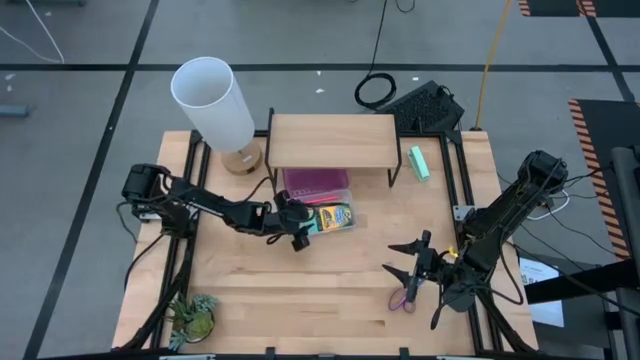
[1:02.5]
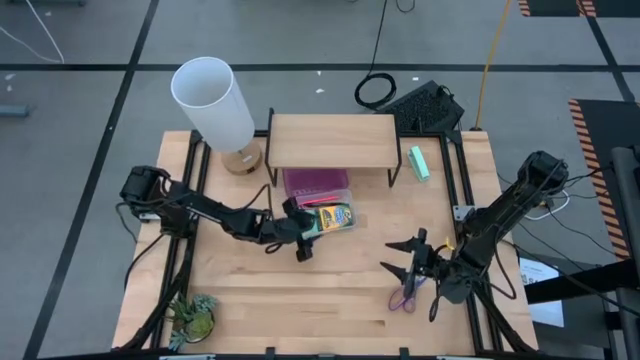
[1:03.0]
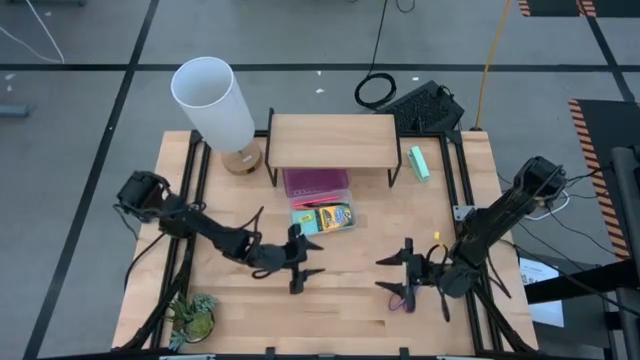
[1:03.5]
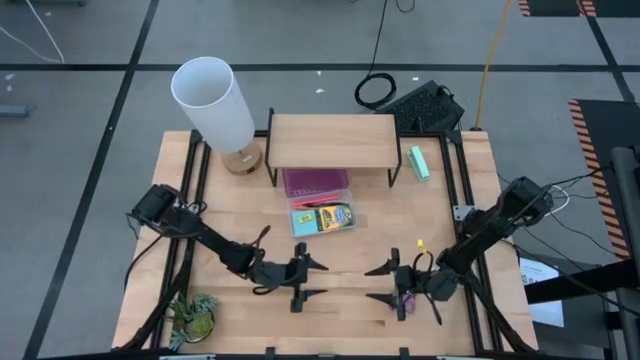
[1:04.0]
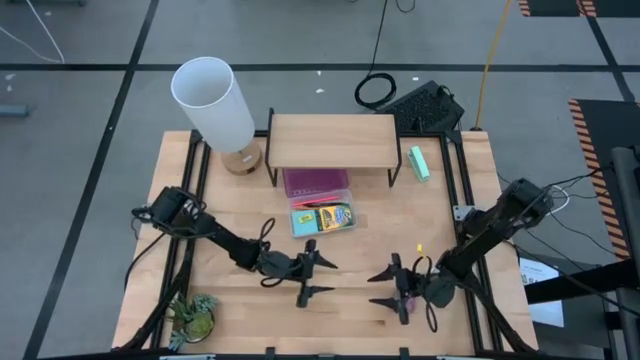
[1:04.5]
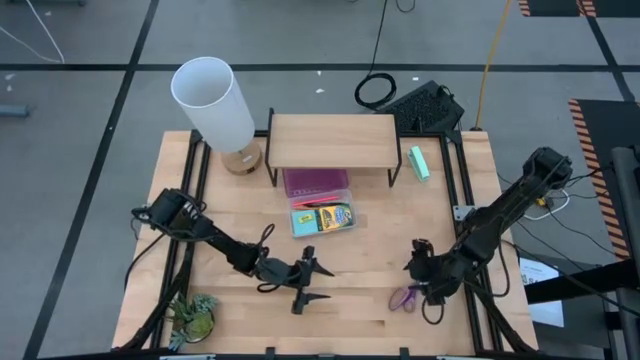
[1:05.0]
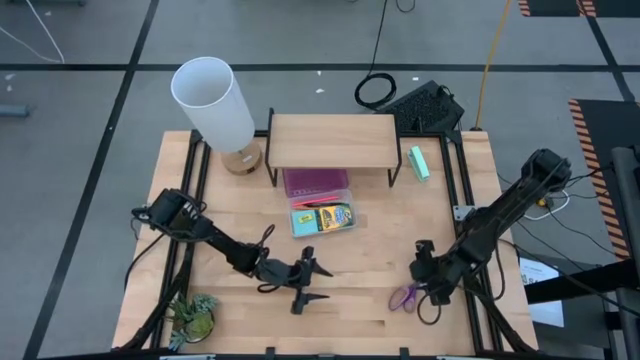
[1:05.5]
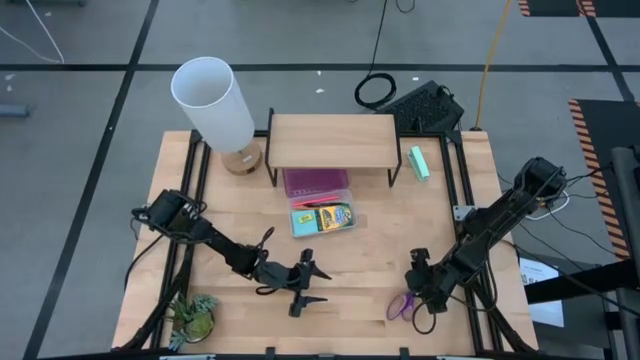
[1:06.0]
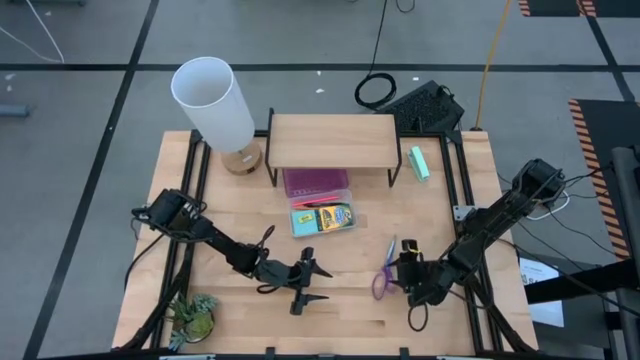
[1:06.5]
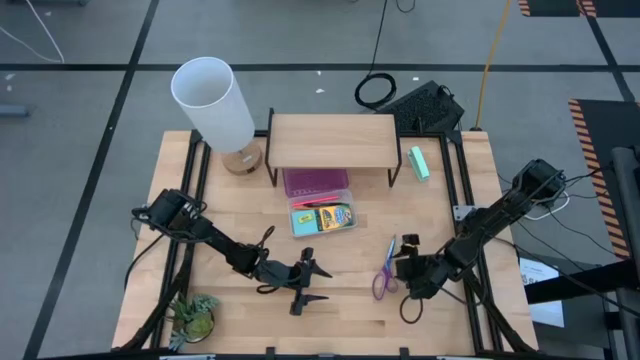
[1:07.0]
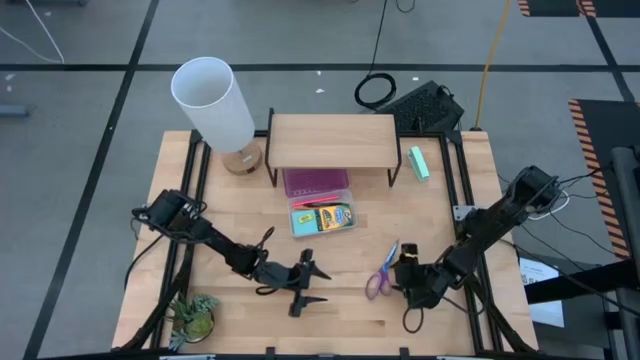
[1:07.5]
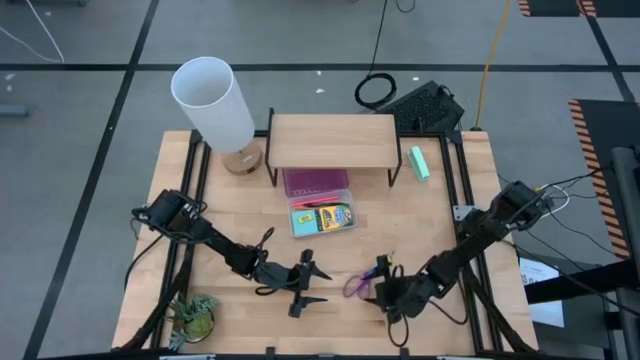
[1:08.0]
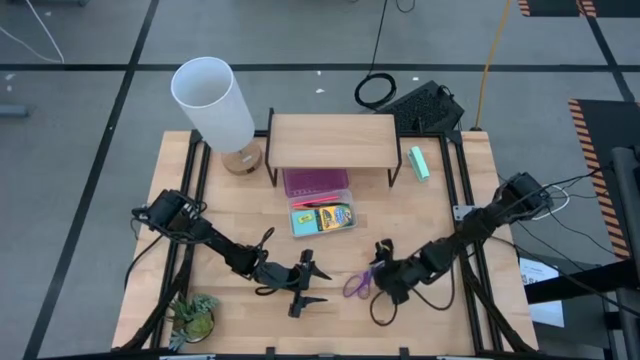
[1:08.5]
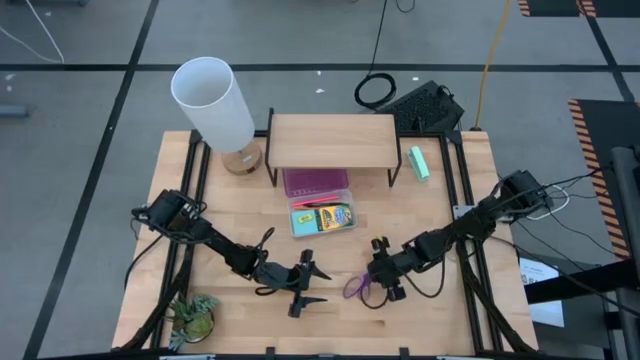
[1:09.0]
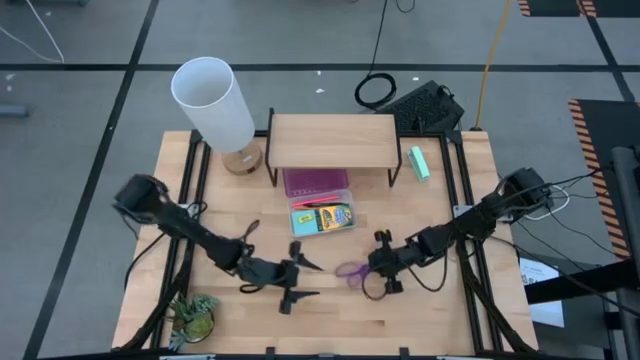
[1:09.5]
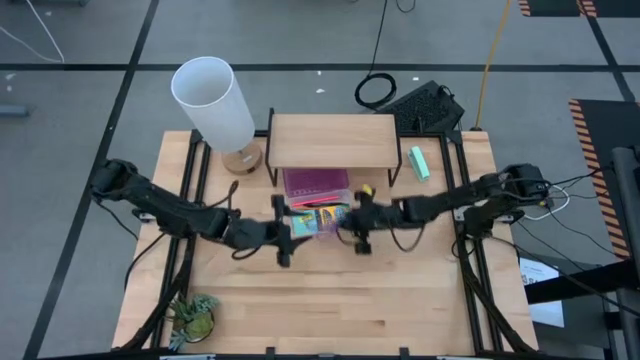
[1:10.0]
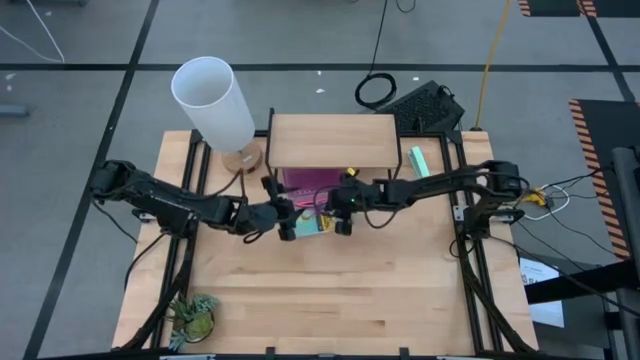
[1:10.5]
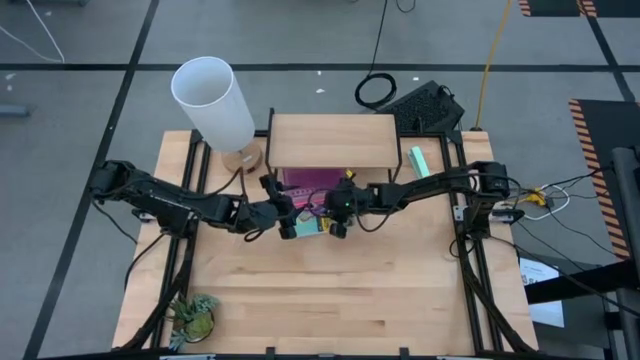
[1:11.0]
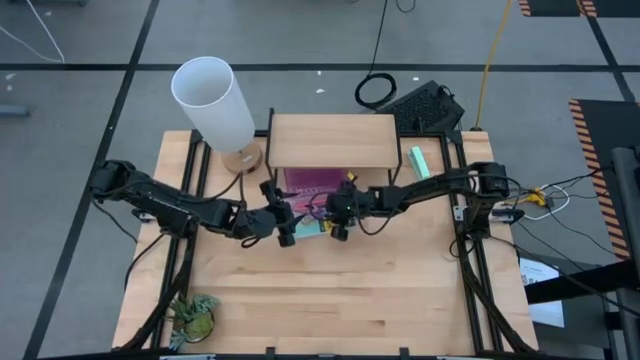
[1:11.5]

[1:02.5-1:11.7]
Task: Pack school essentials
Put the violet scissors into the violet supply box

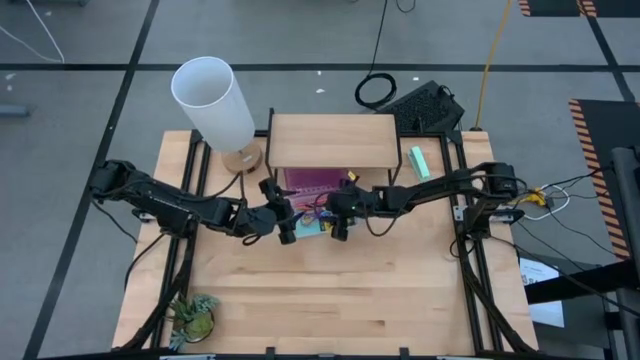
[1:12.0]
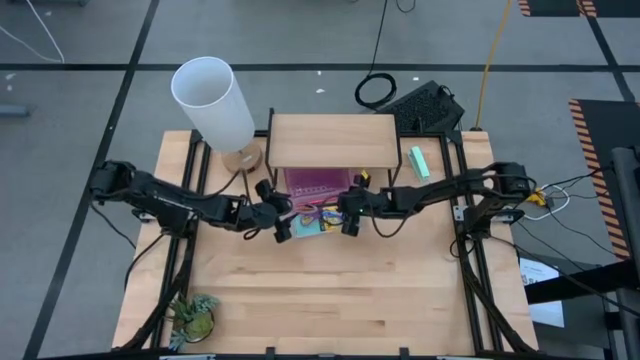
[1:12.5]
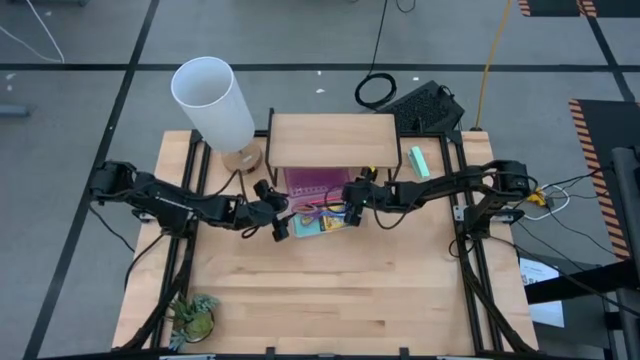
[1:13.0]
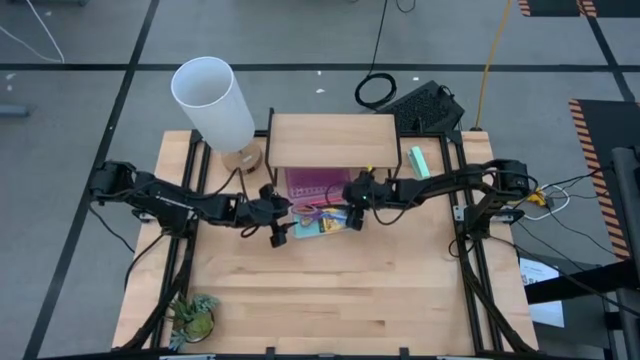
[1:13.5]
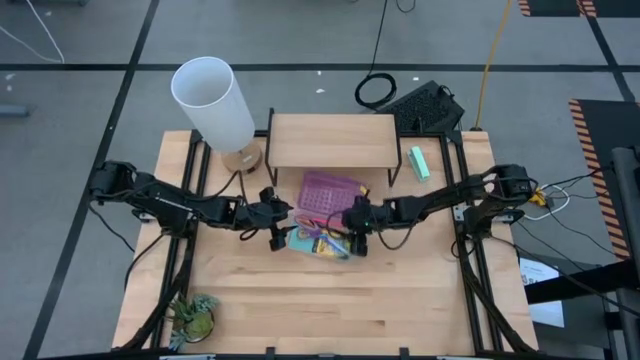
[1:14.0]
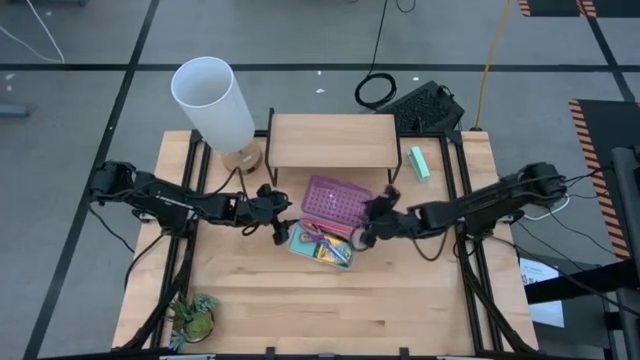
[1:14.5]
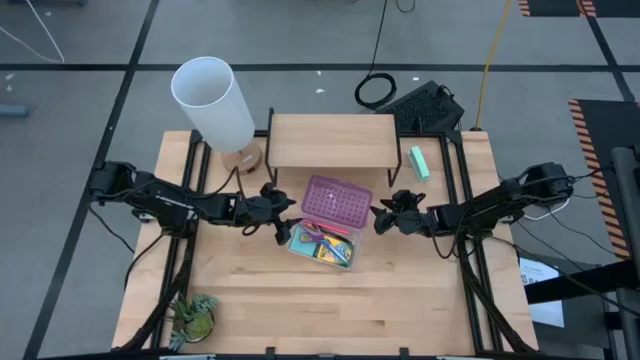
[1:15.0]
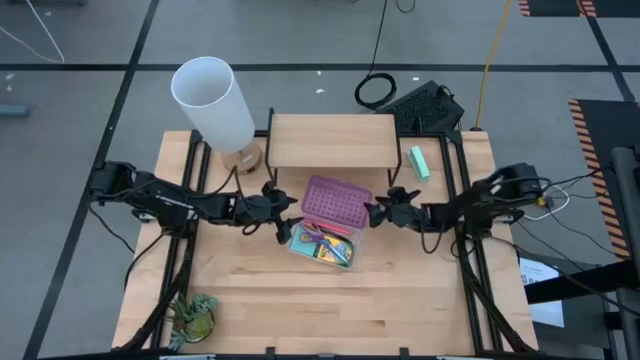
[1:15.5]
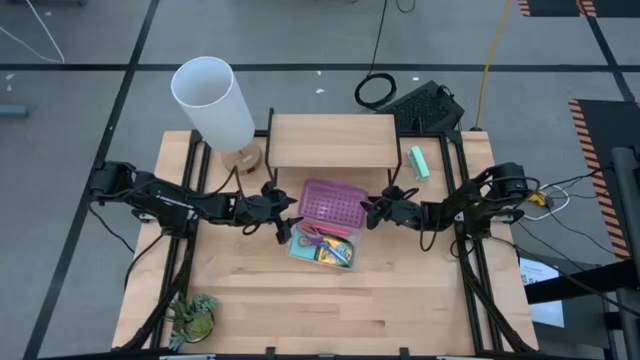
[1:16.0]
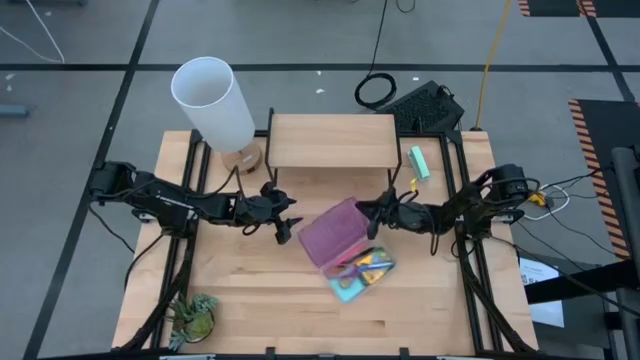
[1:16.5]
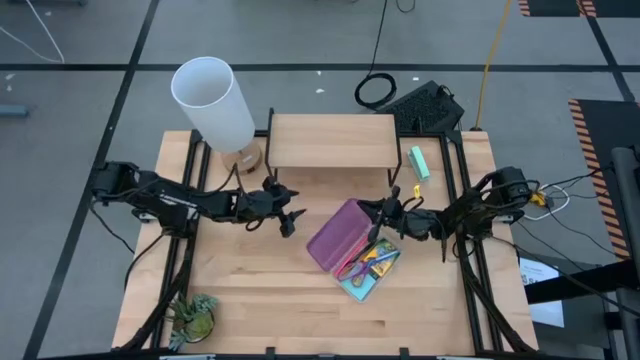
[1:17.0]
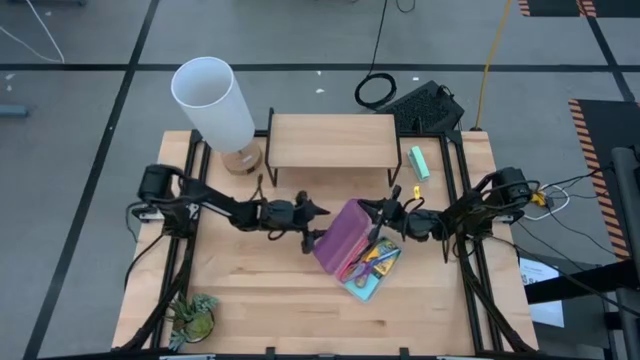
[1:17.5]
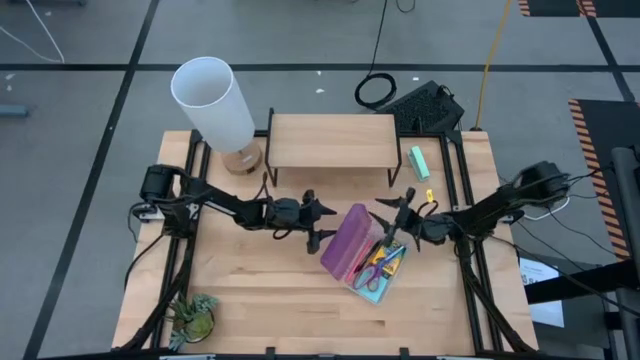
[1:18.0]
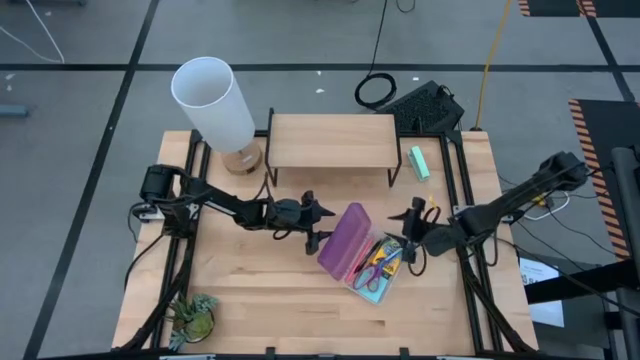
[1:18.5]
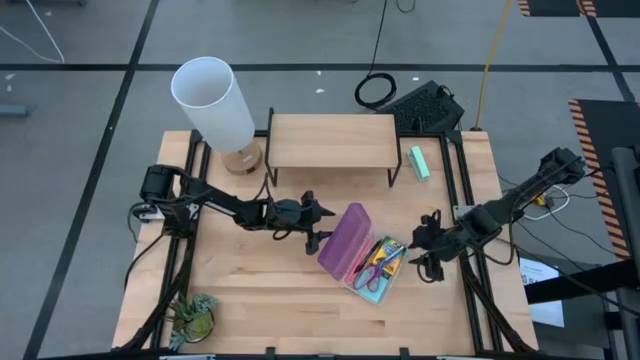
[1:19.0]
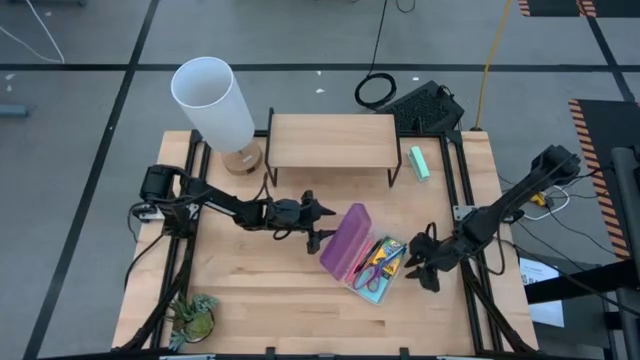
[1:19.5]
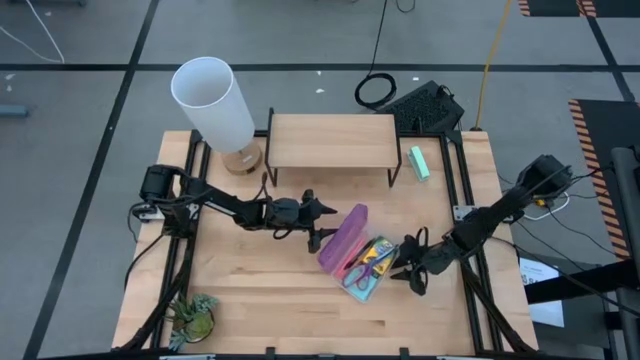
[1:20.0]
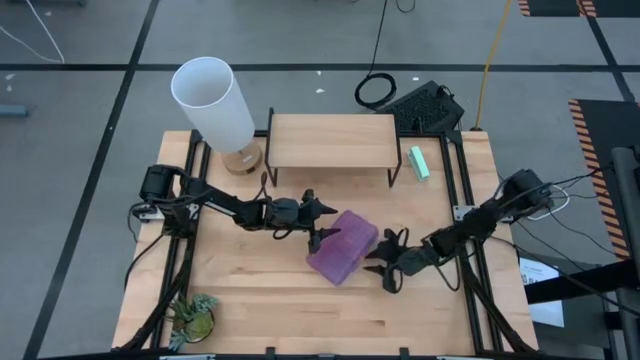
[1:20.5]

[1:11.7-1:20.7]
Close the violet supply box
